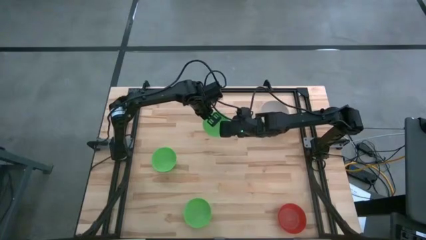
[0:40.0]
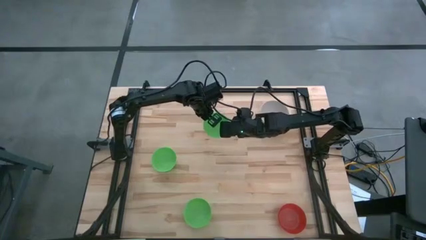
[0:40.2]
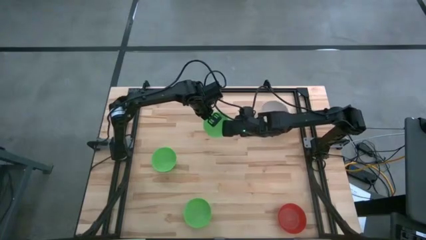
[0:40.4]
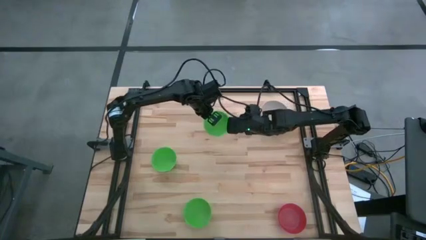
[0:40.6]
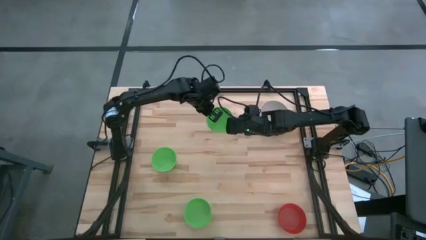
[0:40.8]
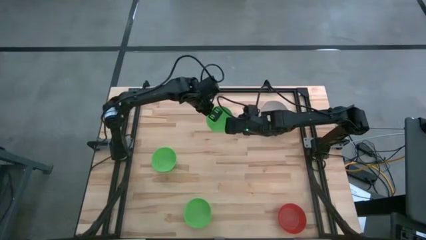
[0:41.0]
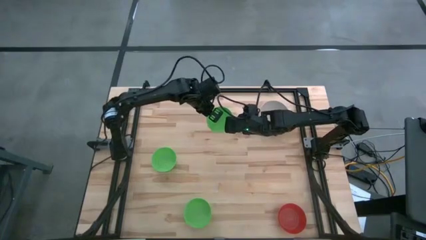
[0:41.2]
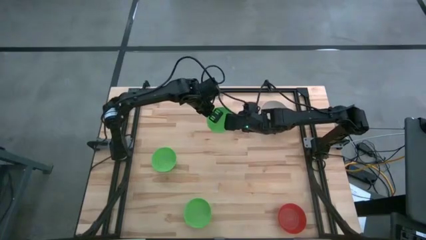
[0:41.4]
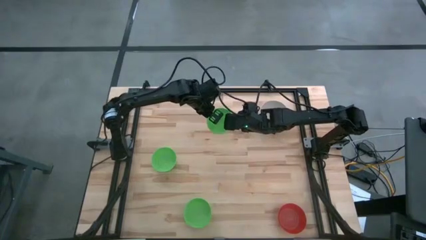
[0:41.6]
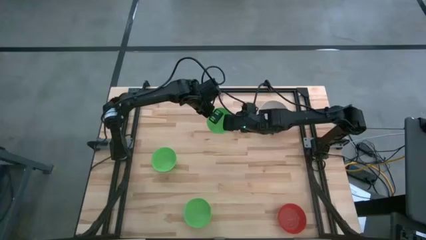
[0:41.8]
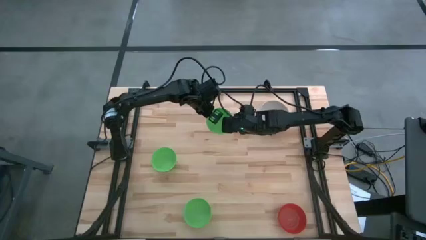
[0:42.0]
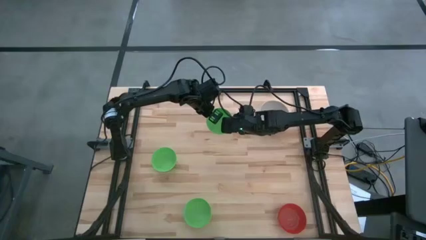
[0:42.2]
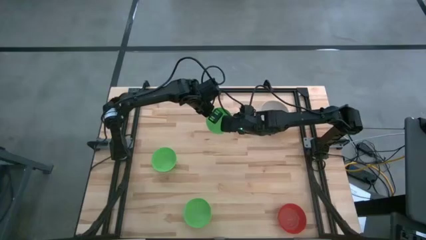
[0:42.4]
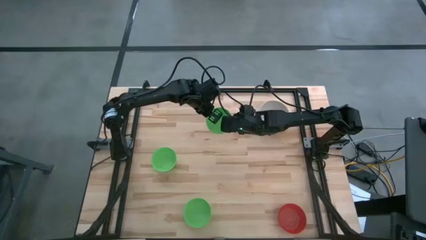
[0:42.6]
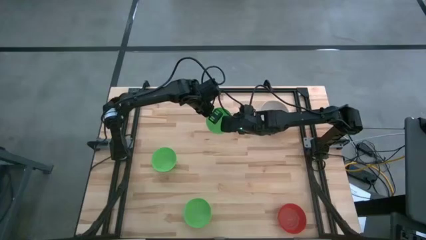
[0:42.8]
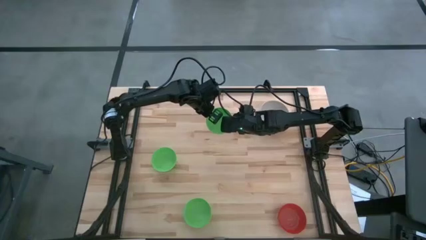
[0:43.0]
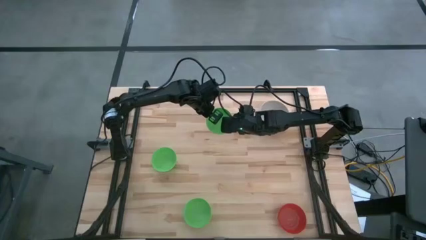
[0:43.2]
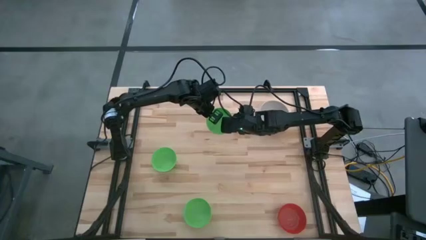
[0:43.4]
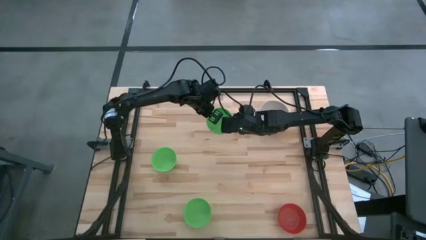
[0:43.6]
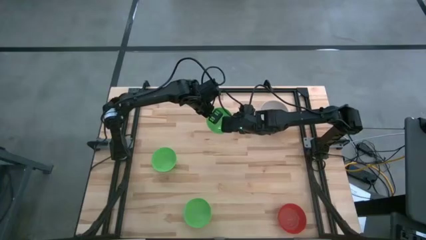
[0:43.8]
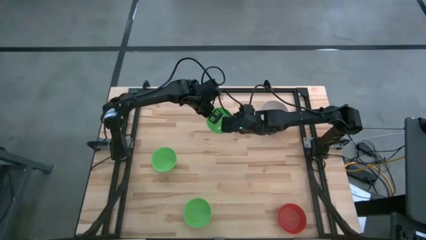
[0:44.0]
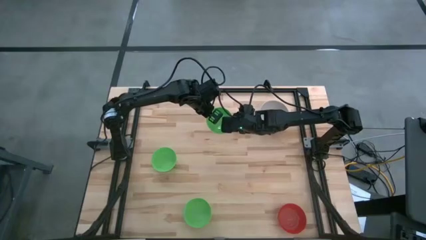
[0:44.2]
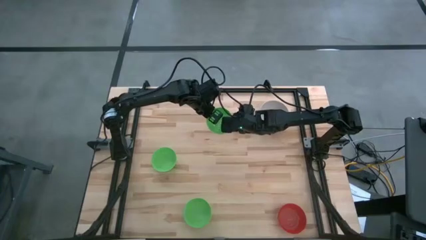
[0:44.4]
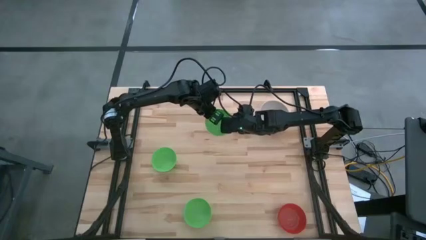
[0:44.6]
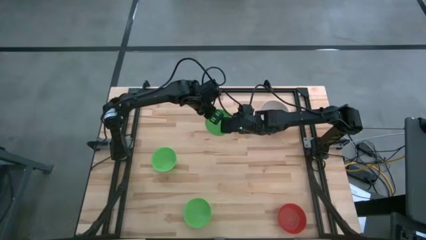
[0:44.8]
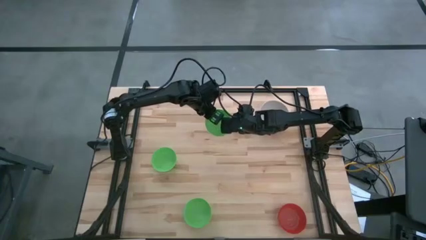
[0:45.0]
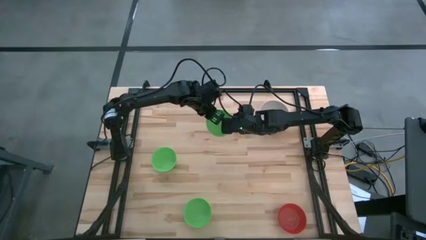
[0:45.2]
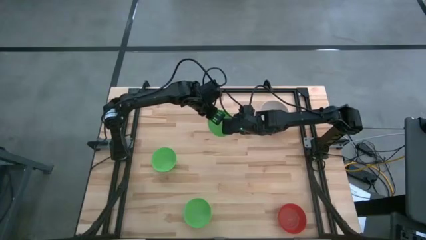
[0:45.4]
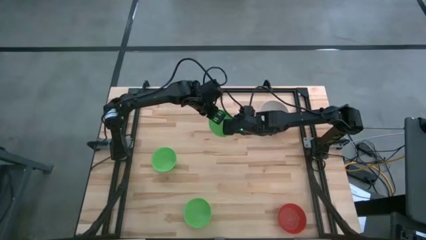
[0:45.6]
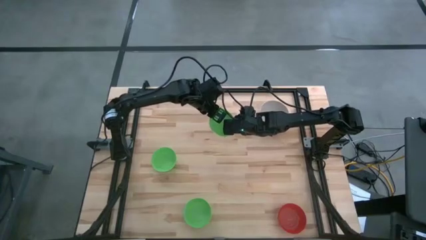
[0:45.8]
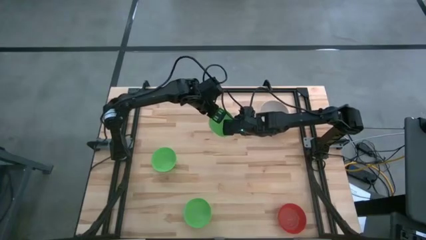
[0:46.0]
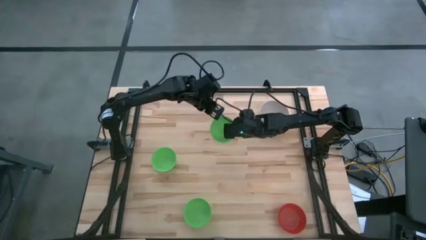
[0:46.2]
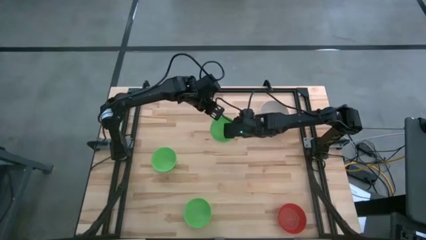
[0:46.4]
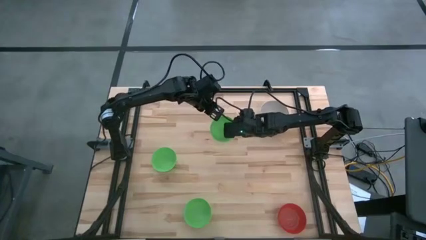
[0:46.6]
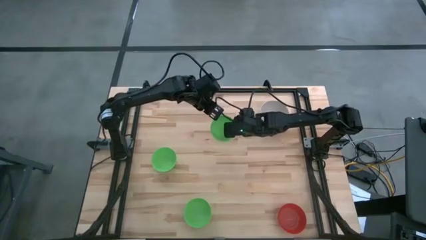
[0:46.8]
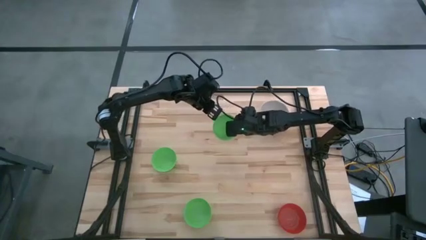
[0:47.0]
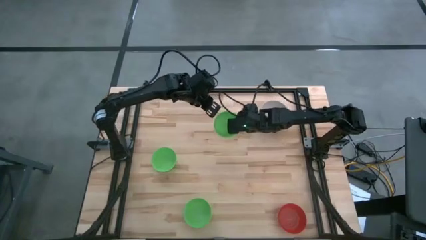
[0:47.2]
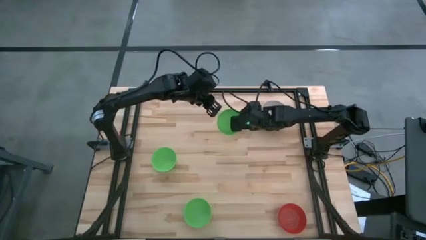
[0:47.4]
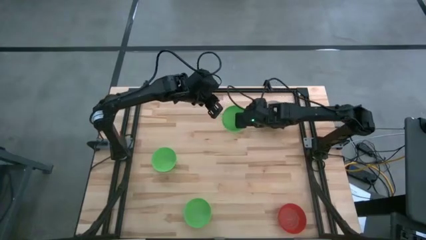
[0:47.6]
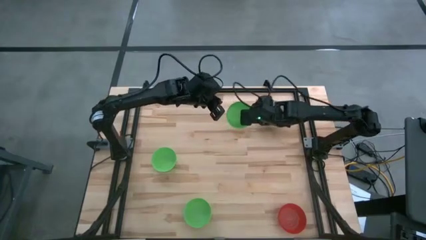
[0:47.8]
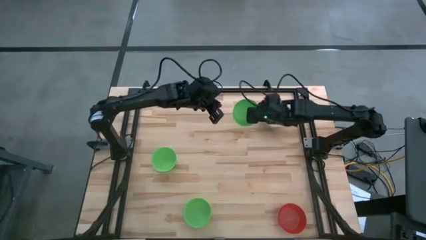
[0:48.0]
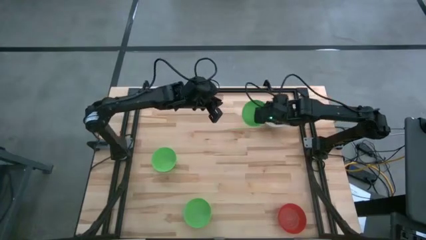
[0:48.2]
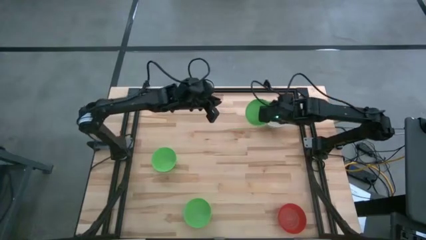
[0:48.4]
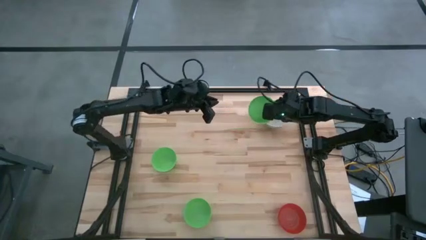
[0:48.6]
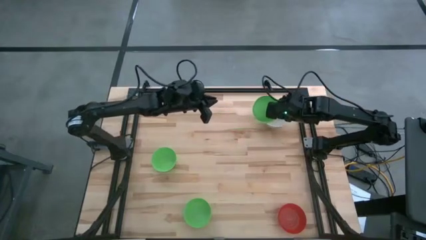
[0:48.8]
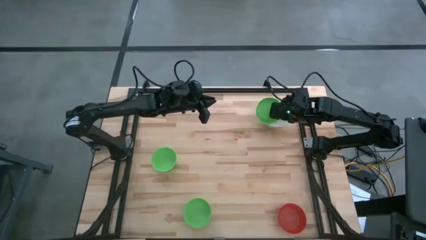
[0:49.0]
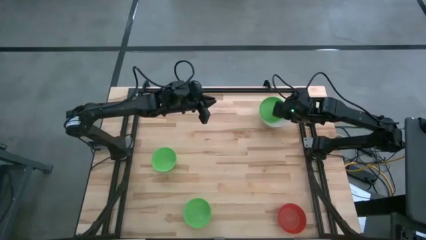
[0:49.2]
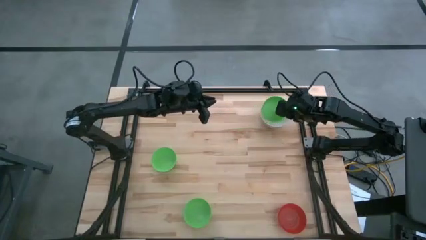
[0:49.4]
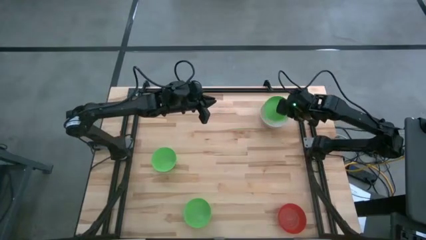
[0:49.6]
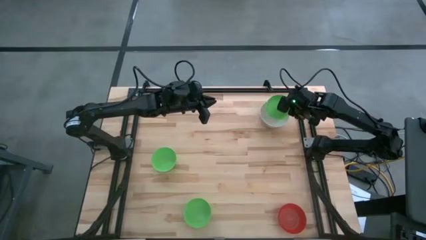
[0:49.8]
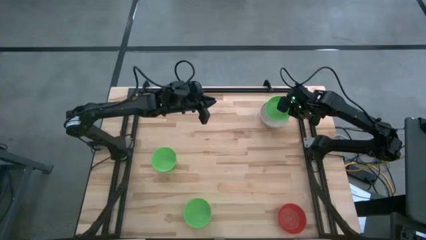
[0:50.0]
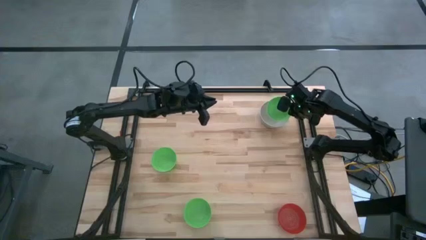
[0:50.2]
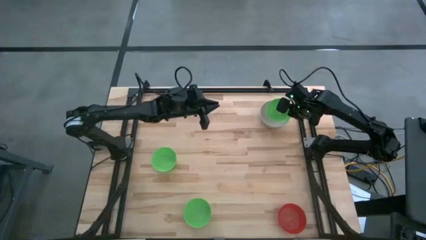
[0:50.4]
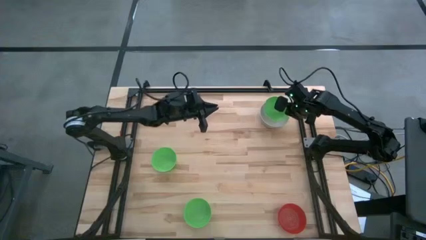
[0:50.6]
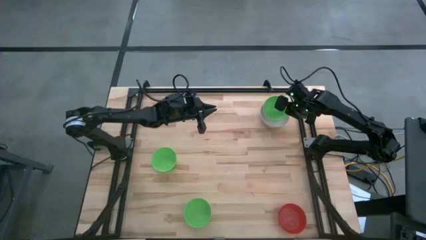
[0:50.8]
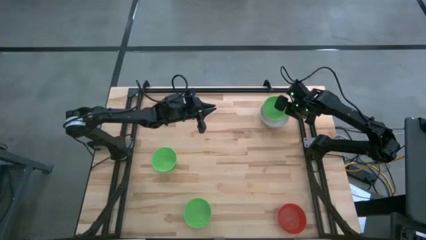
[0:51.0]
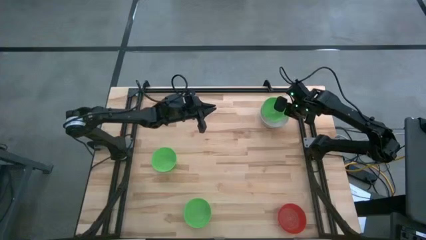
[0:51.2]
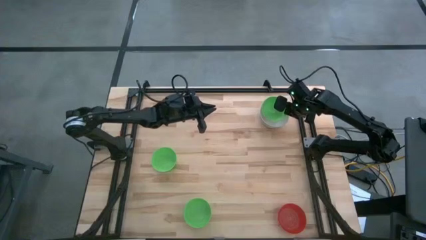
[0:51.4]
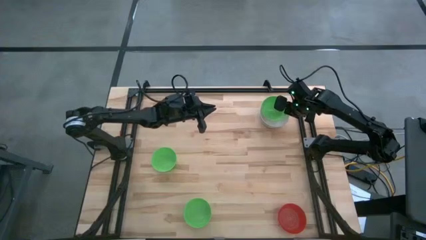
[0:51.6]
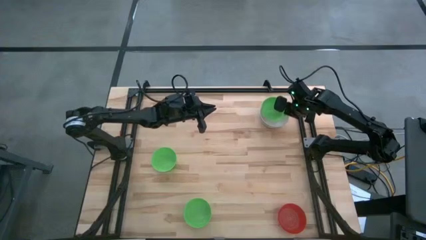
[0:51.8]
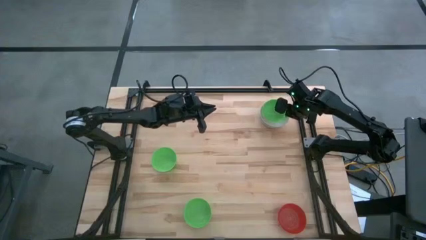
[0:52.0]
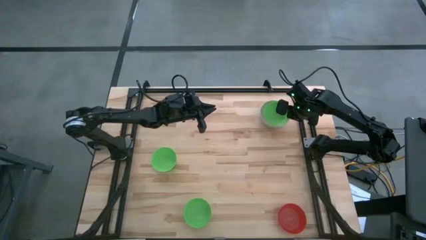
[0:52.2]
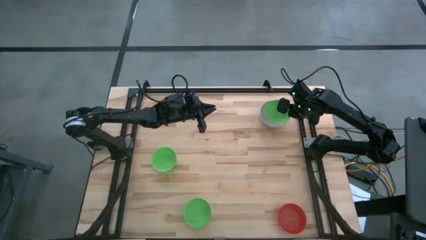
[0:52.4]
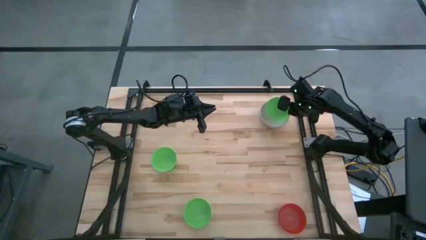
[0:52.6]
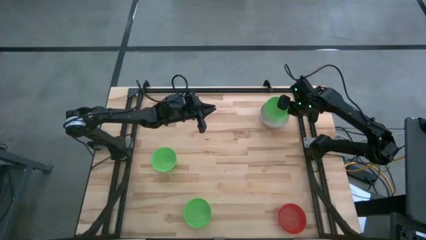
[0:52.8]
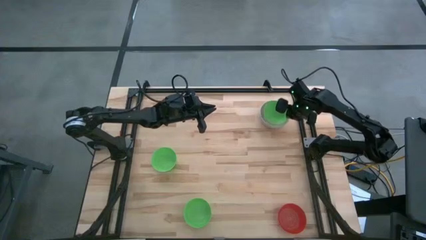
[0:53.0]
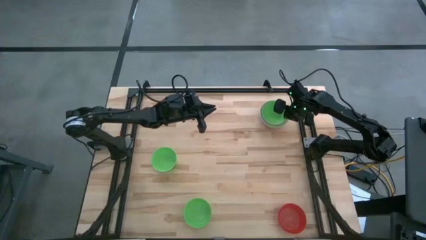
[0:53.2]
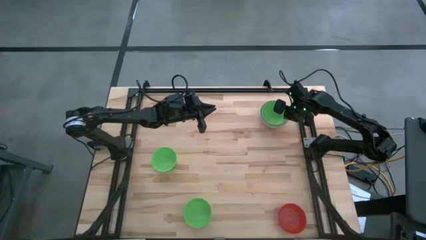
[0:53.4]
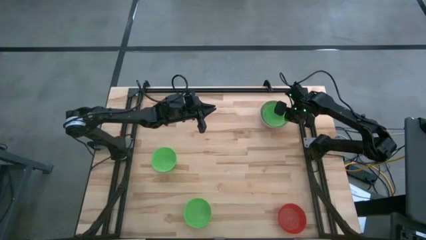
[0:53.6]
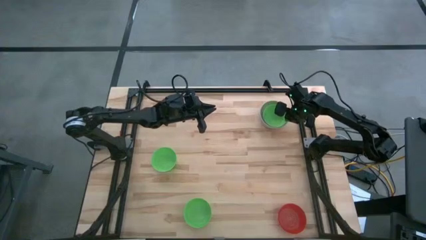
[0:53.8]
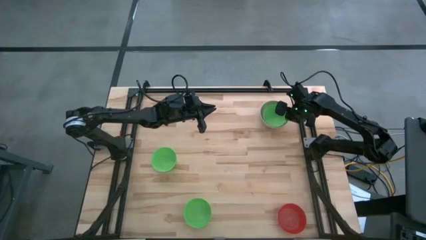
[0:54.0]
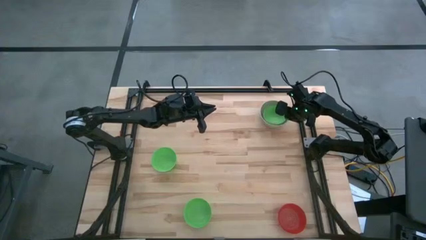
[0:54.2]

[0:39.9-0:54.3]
Stack the top right green bowl on top of the gray bowl
